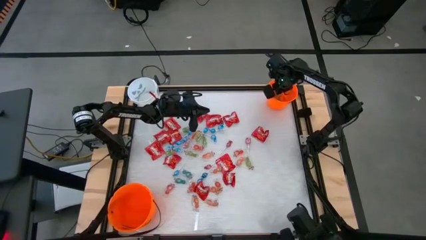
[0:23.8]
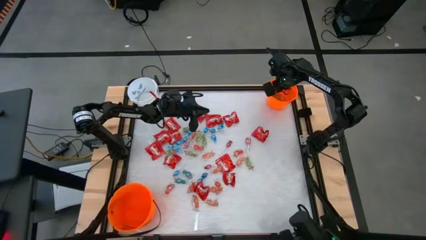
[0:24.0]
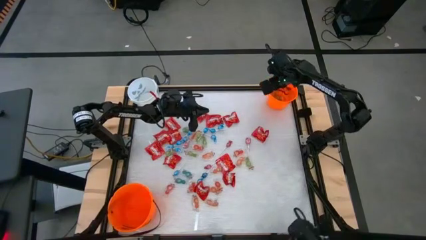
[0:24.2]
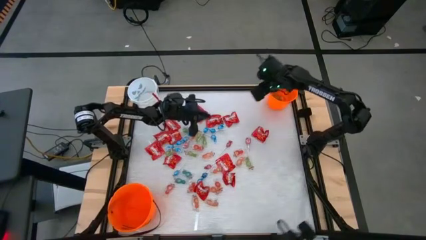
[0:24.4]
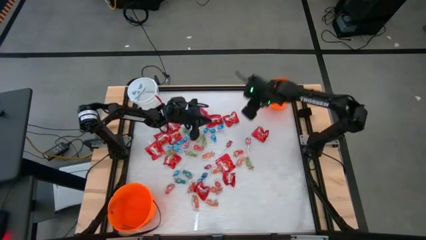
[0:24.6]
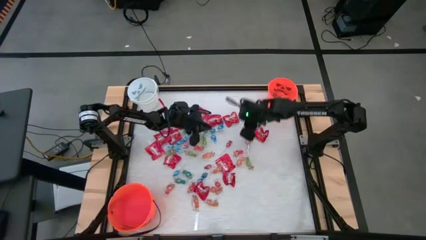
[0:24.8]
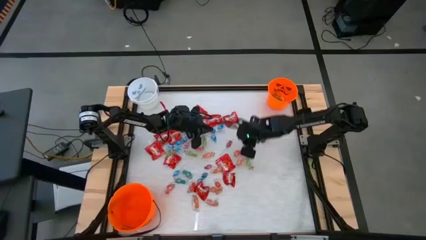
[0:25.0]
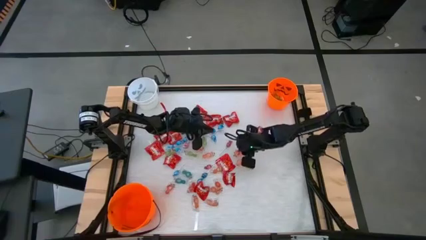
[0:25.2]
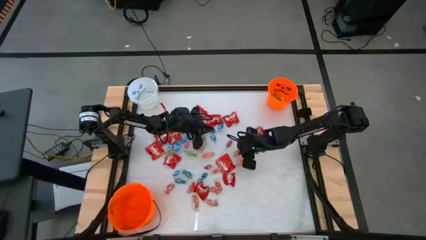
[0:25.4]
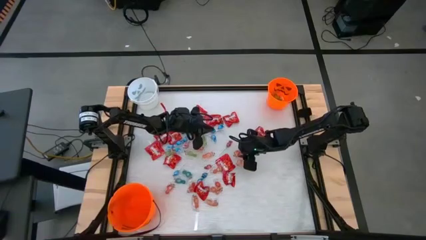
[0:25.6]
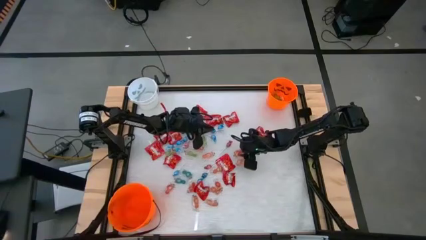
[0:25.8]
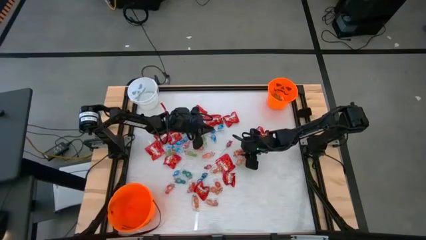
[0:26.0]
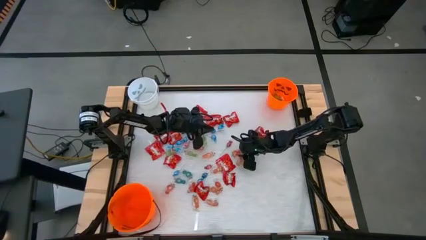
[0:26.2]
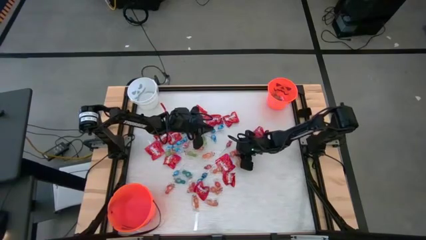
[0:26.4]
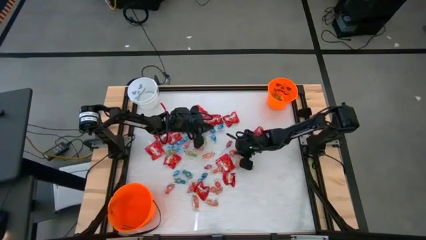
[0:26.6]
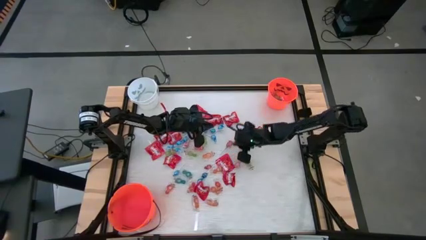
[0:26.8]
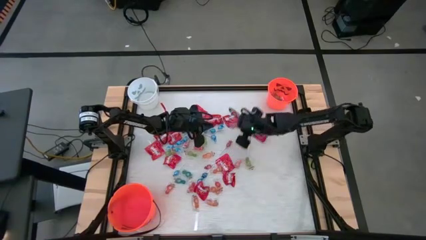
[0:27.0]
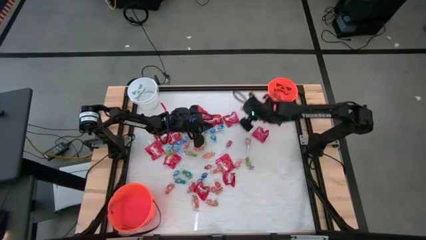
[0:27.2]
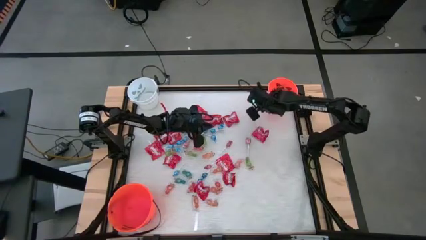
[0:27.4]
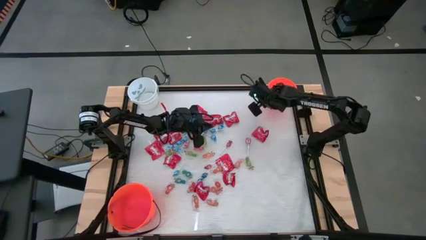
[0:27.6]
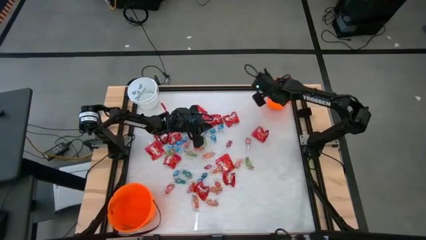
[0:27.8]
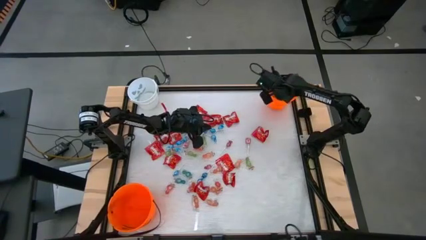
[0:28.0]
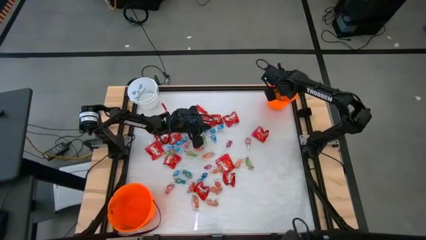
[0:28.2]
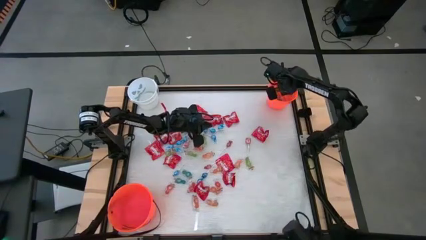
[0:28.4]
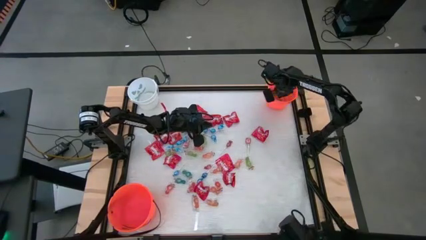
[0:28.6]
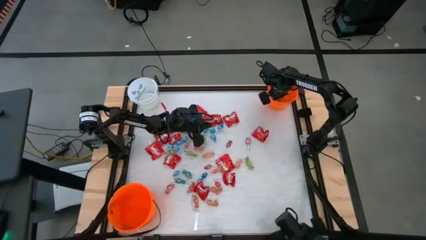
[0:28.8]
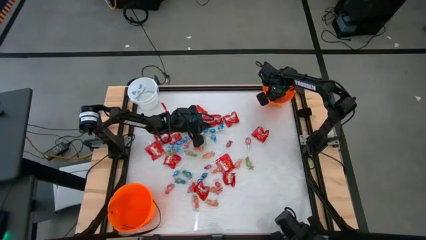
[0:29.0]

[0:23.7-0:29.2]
Task: Sort candy by brand, put in halloween buckets
Put the red gummy into the top orange bucket

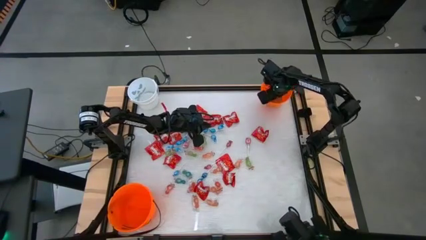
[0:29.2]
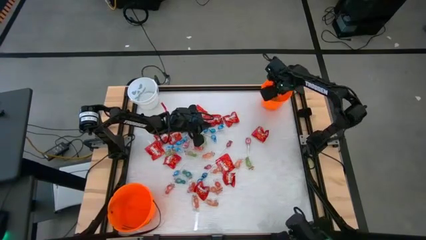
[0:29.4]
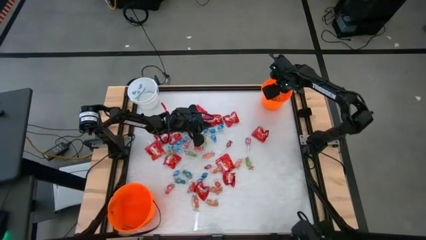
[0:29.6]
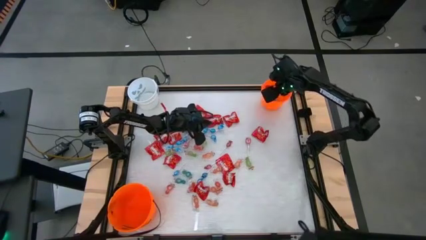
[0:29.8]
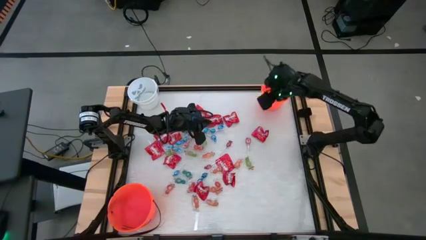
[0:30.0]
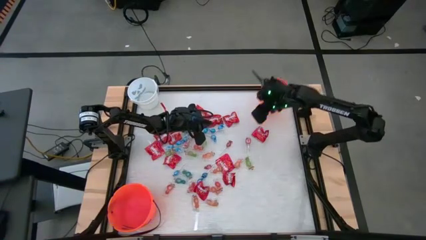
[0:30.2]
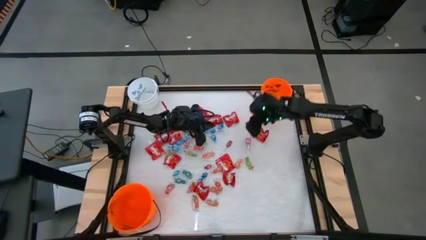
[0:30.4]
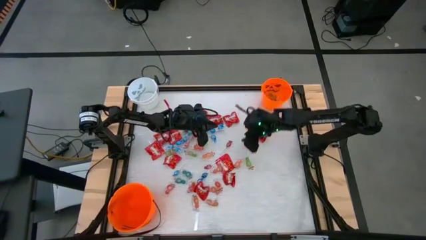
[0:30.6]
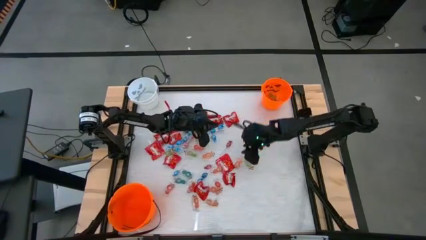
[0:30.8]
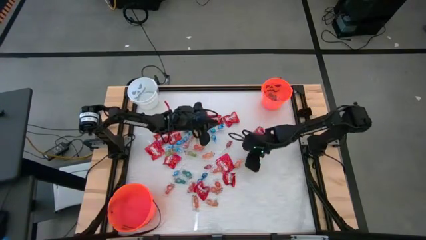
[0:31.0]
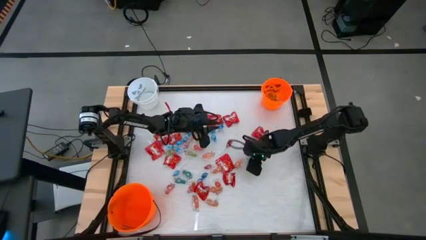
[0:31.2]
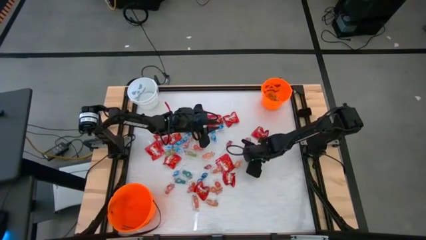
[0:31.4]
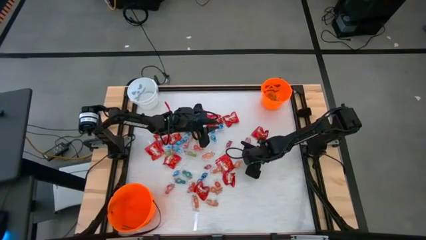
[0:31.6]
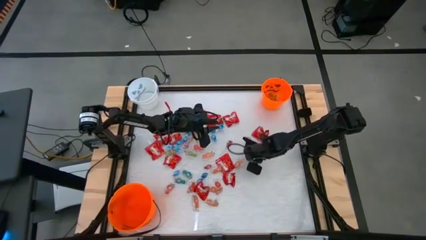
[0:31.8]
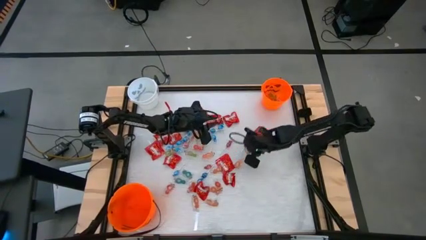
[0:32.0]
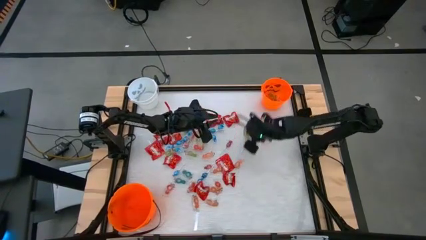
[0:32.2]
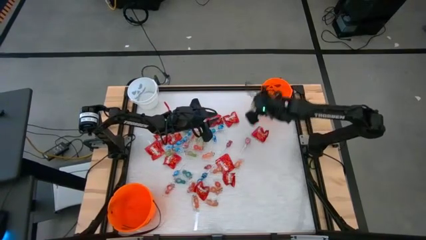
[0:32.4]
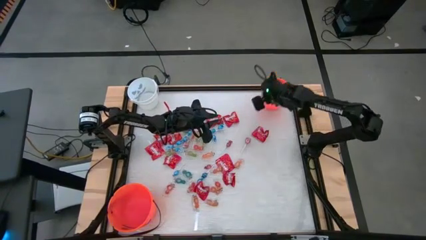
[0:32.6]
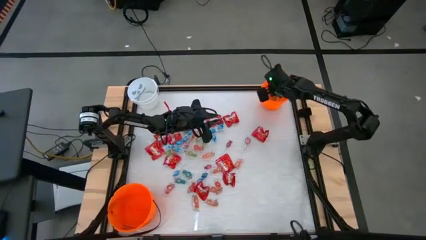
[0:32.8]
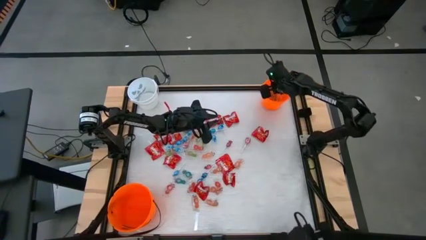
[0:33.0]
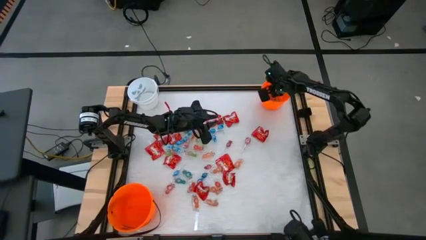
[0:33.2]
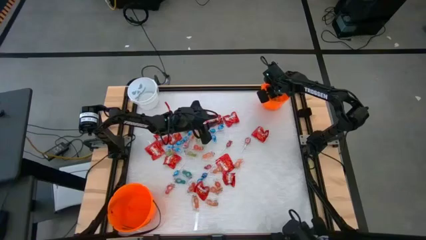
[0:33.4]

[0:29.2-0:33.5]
Put the green gummy into the top orange bucket

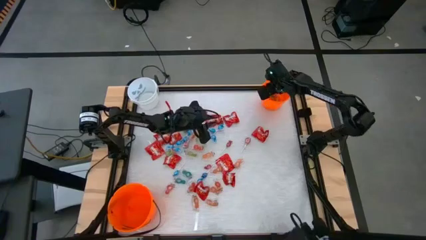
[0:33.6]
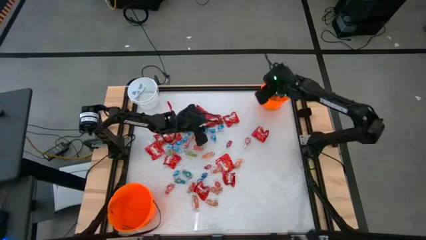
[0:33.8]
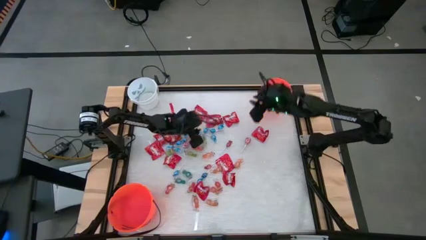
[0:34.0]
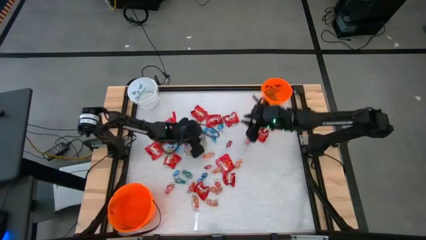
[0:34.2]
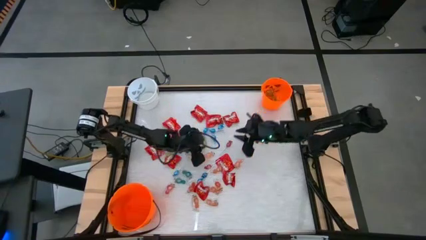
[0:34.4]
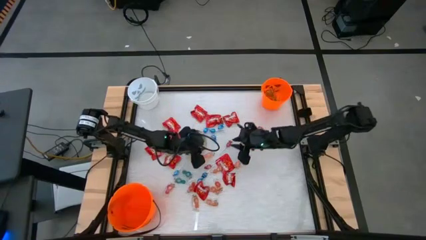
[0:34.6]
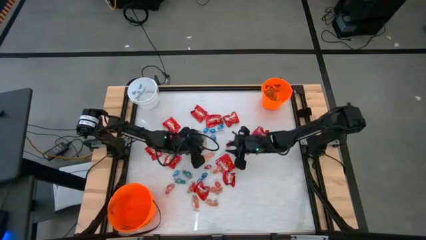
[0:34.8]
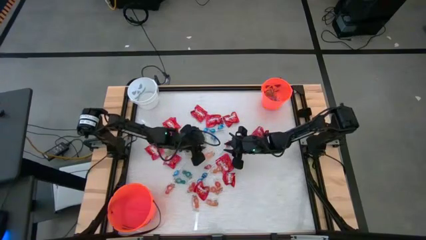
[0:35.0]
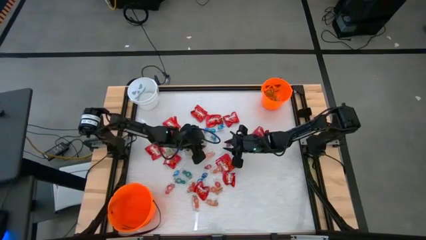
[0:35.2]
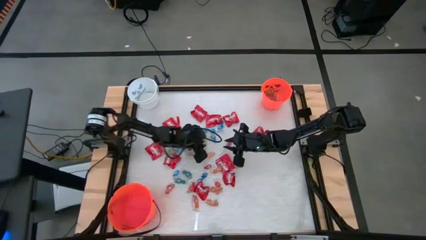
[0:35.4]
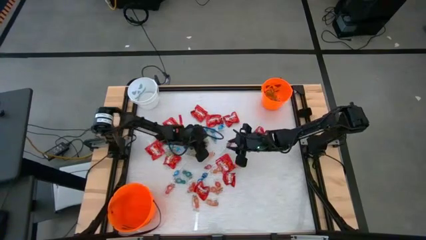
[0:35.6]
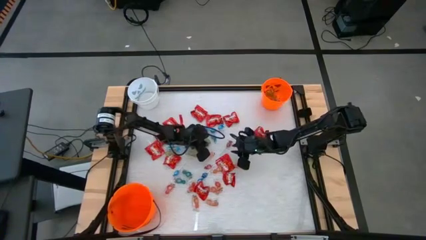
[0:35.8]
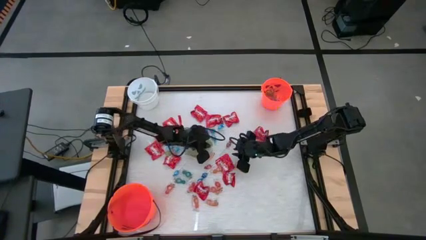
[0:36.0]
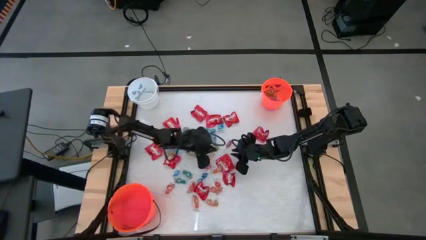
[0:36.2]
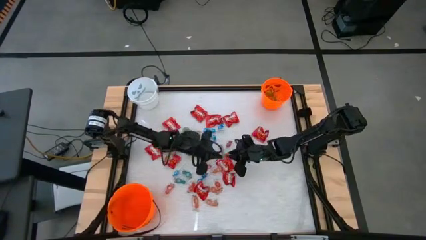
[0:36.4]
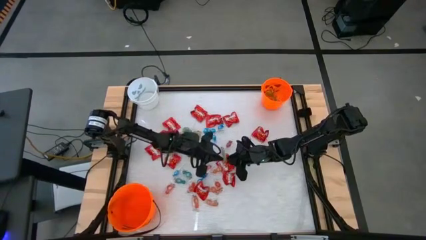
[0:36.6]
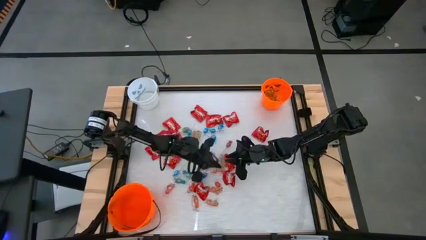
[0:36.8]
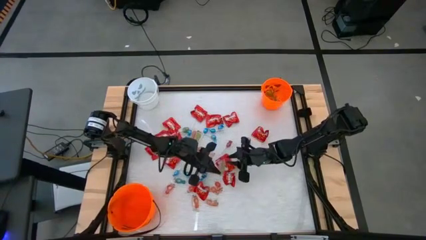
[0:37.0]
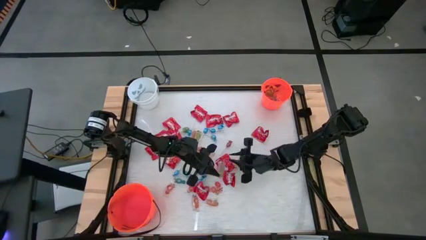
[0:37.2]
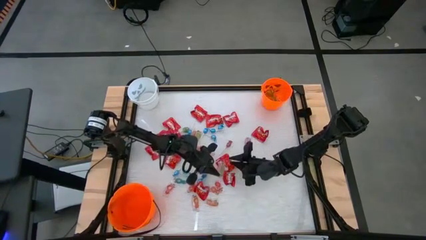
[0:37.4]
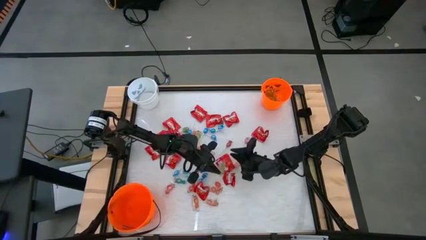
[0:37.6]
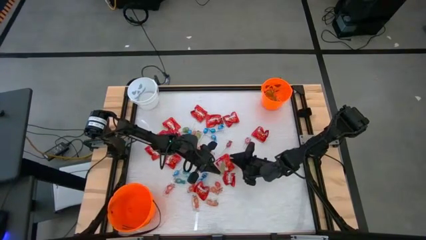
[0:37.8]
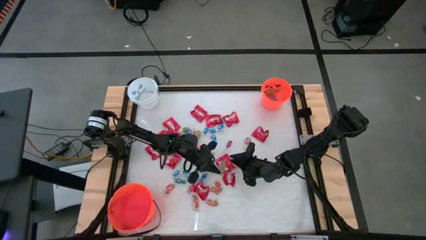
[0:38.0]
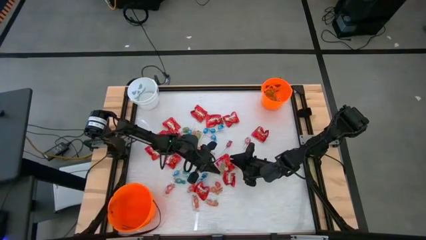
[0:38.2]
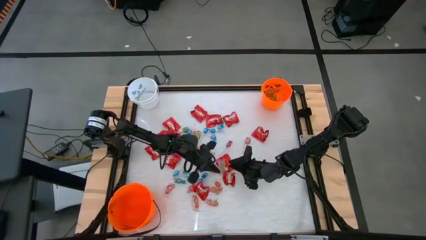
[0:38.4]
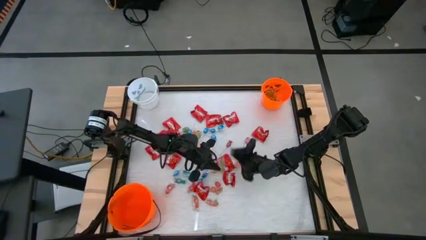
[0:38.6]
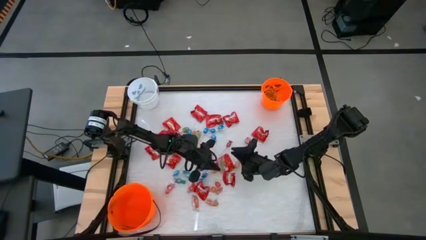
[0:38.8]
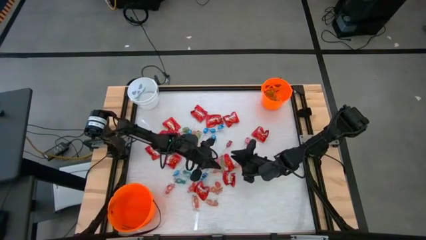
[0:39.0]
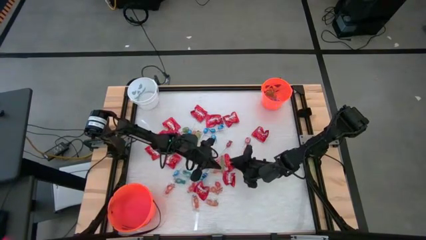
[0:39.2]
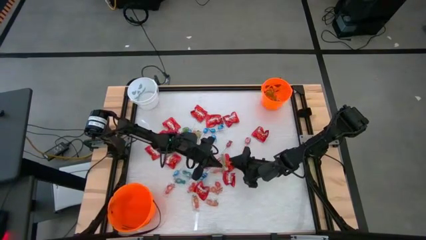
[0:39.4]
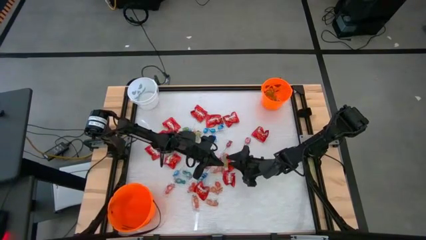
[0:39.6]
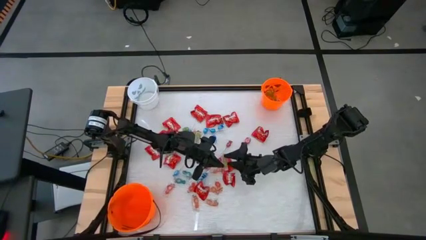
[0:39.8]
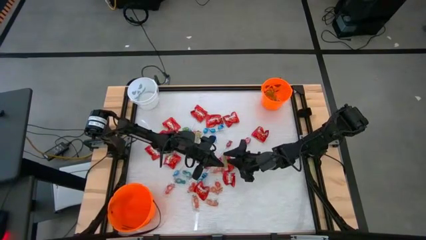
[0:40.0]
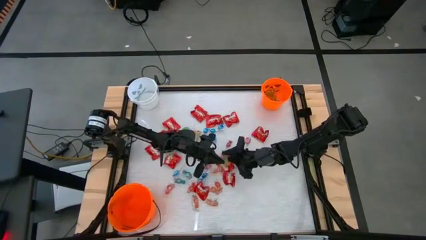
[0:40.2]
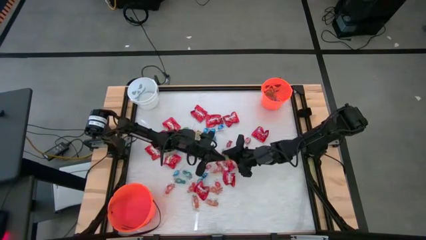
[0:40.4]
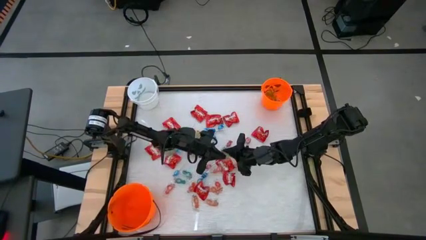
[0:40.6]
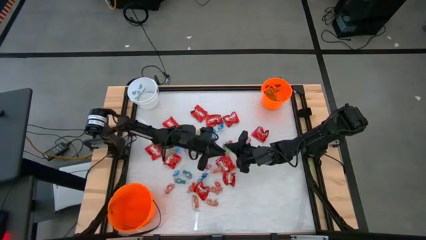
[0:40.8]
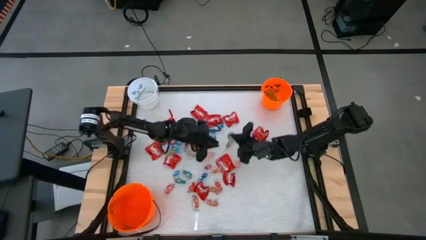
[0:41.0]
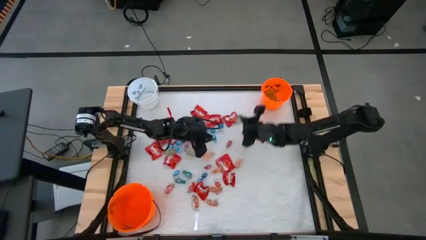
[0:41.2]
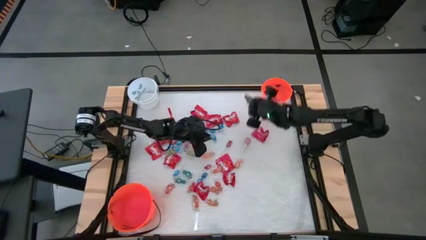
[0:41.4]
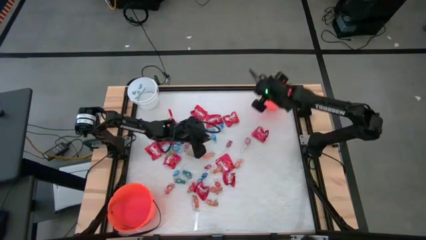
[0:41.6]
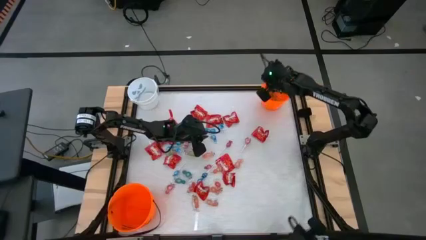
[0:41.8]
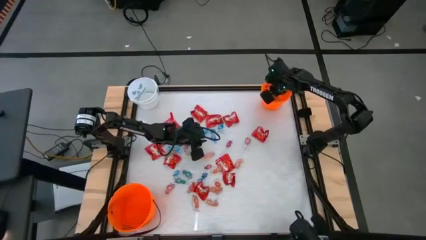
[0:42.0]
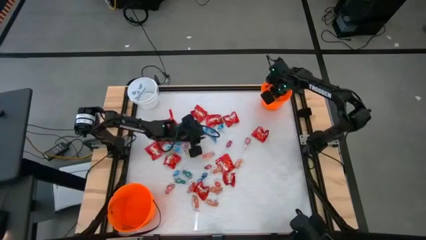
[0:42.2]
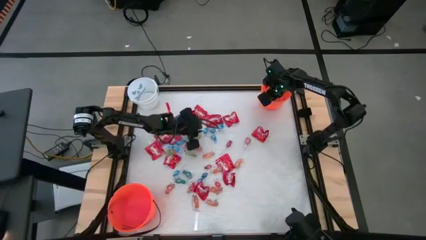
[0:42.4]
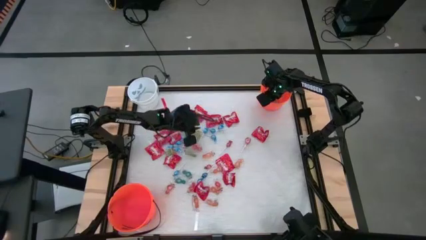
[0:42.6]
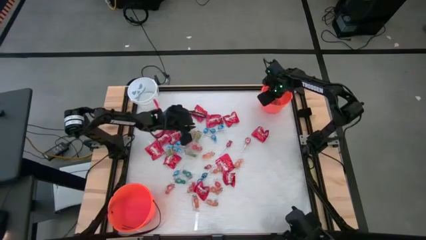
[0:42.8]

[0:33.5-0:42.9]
Put the green gummy into the top orange bucket
